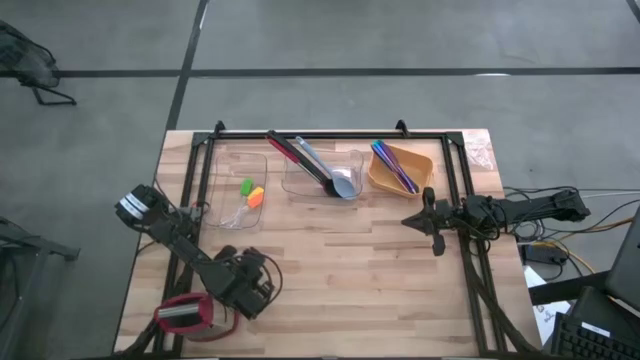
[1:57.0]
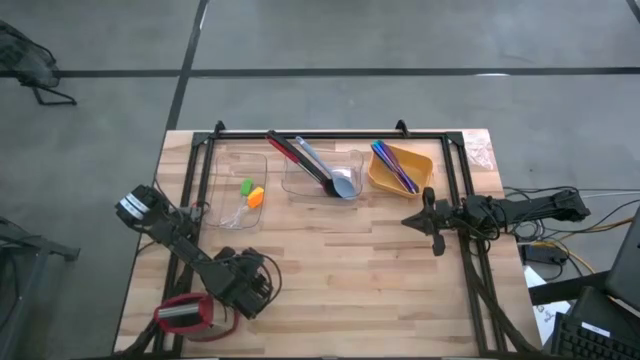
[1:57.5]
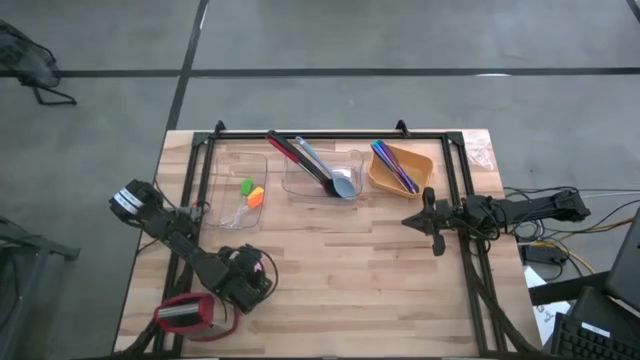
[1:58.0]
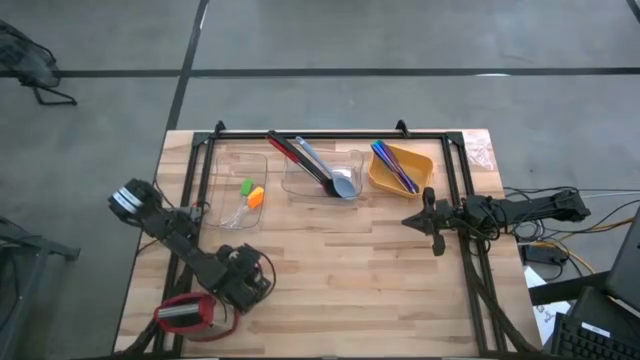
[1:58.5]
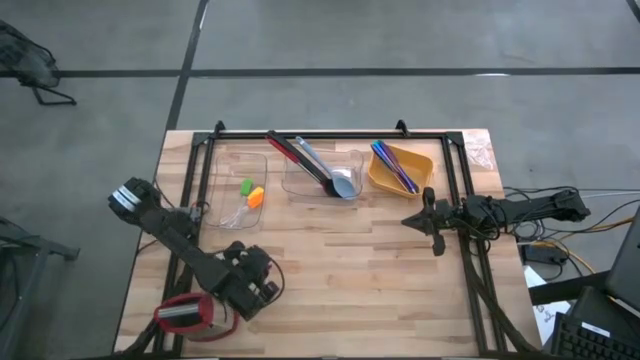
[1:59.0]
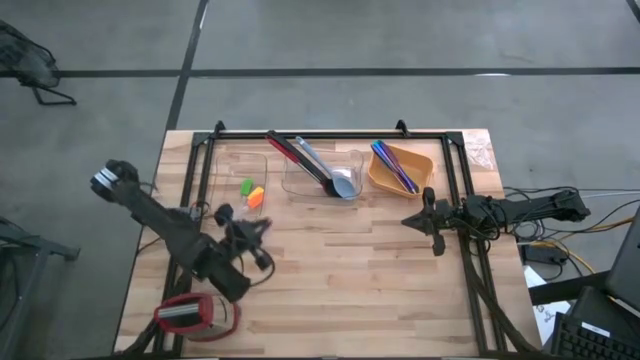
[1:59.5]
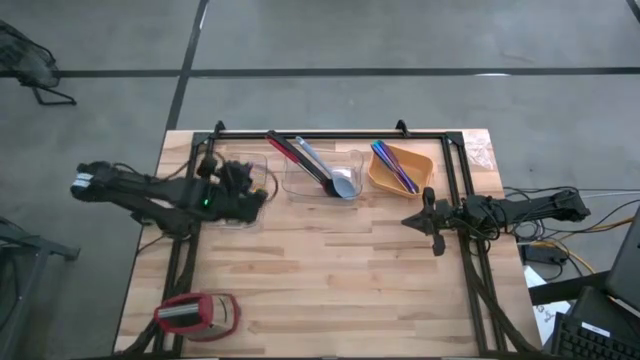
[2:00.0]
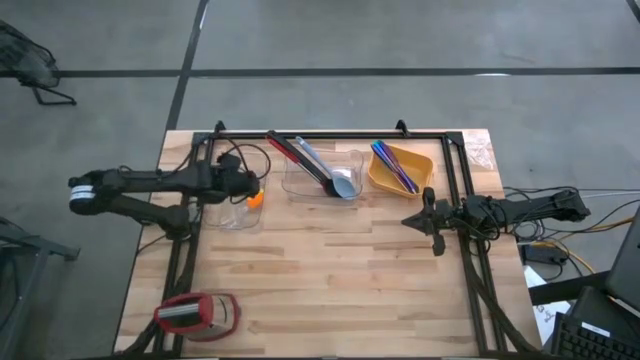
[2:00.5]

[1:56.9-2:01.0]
Task: Sort silverware by color (type)
Put the pink spatula into the left transparent bin

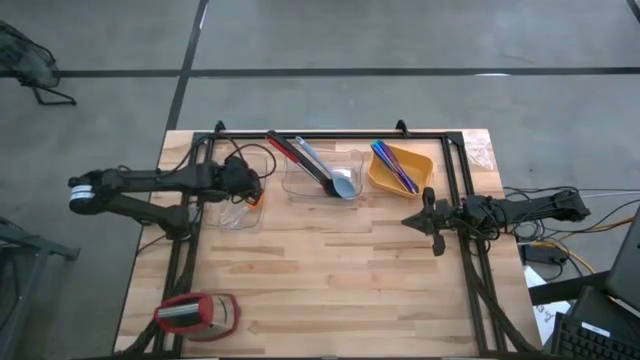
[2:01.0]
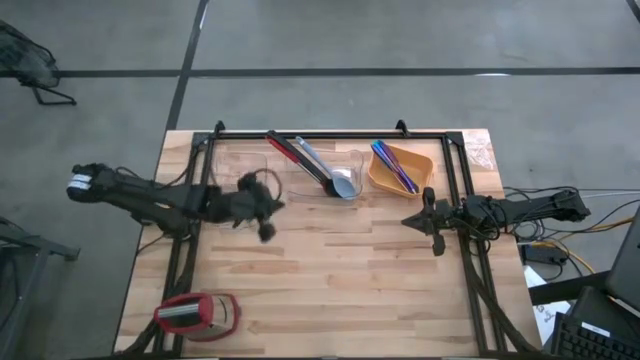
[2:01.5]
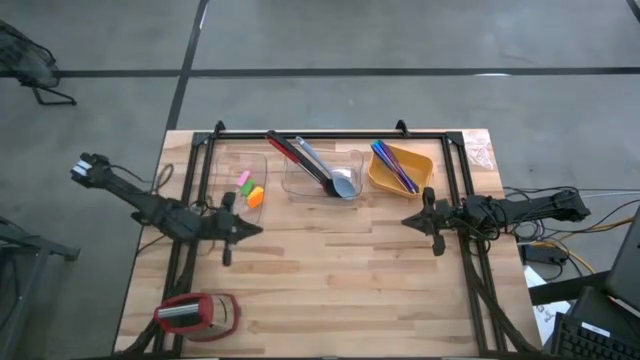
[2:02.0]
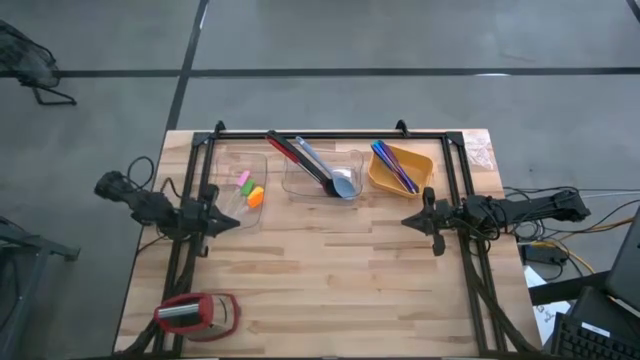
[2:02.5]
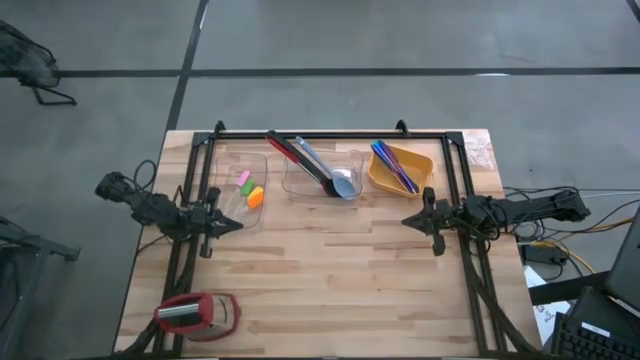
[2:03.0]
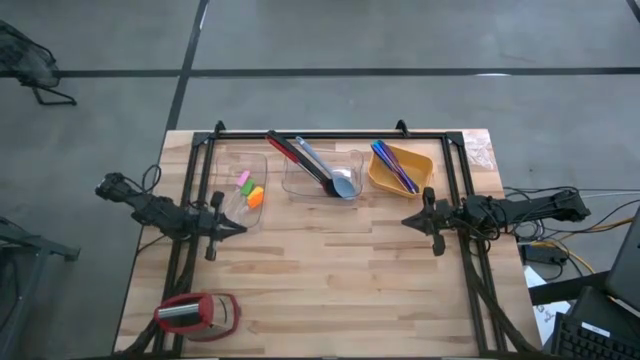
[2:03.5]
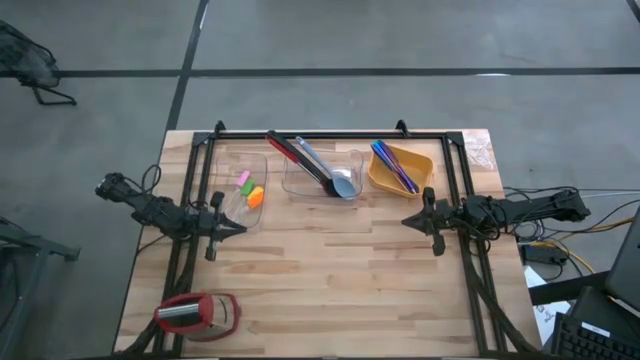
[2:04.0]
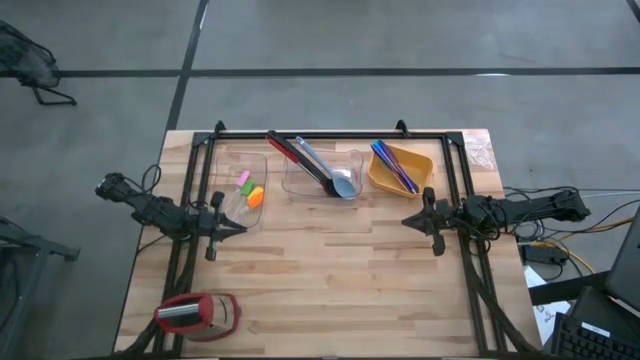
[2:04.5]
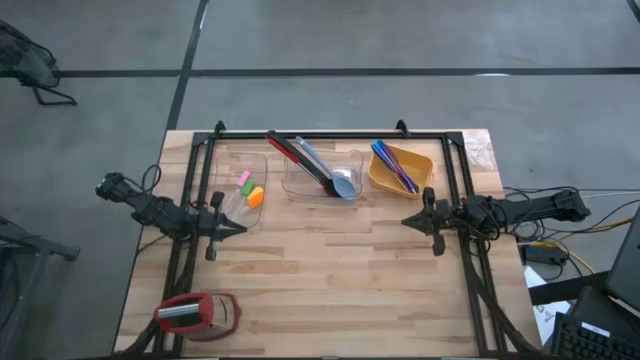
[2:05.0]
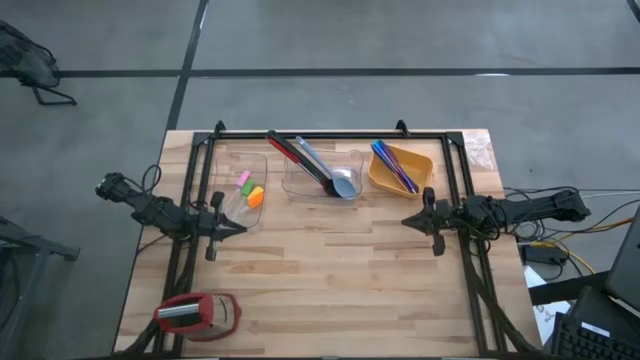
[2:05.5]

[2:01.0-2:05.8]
Return to home position

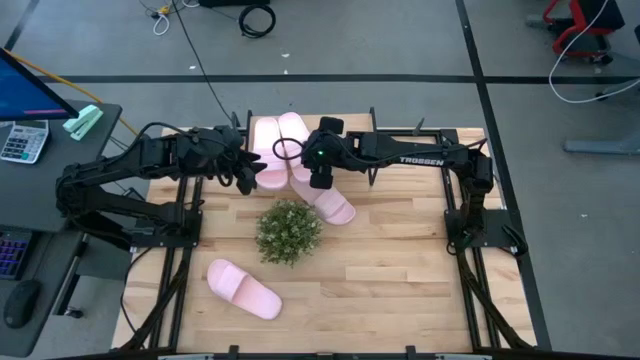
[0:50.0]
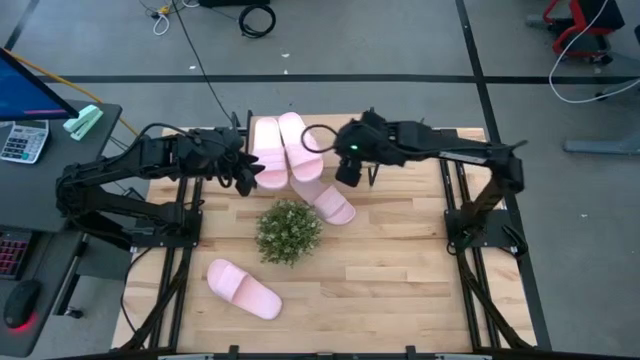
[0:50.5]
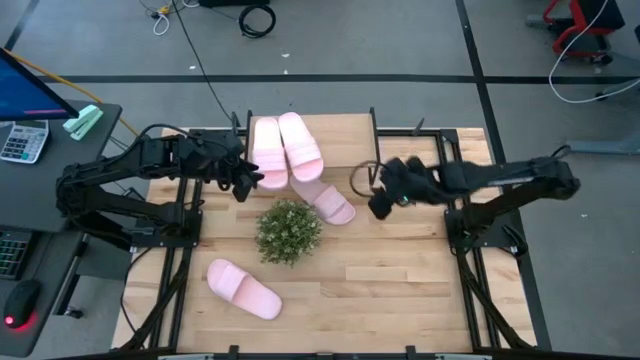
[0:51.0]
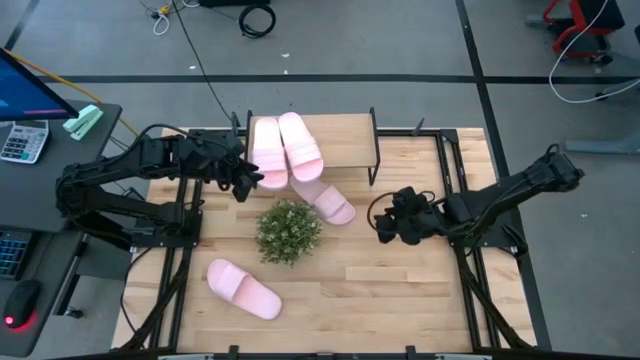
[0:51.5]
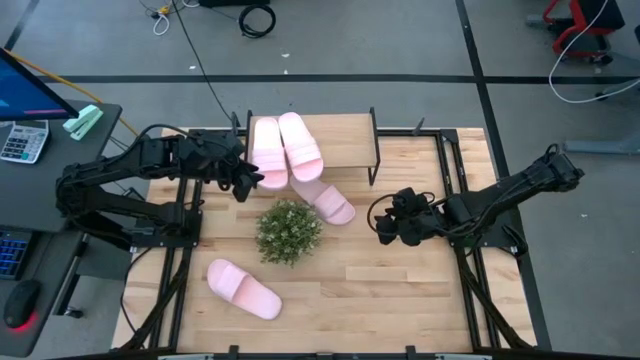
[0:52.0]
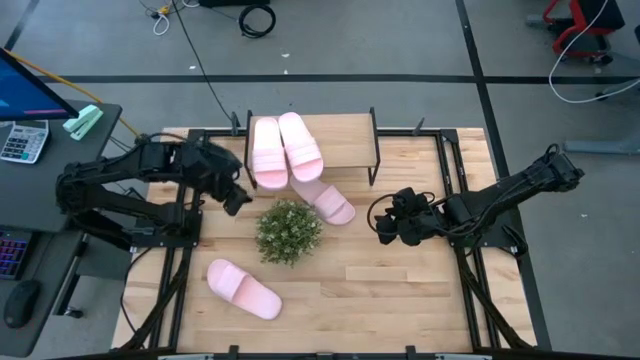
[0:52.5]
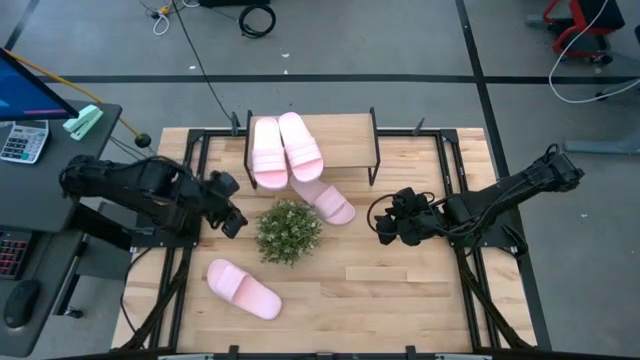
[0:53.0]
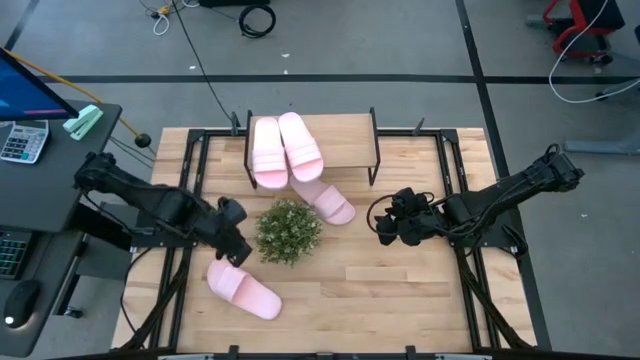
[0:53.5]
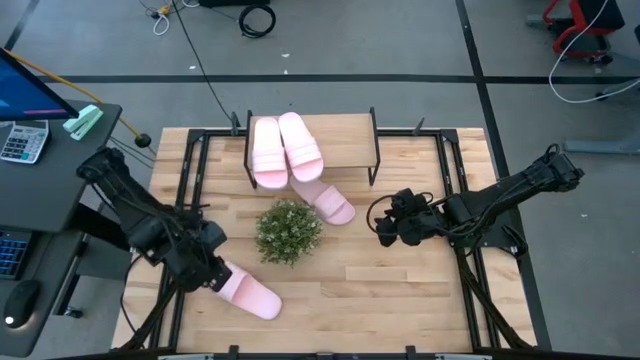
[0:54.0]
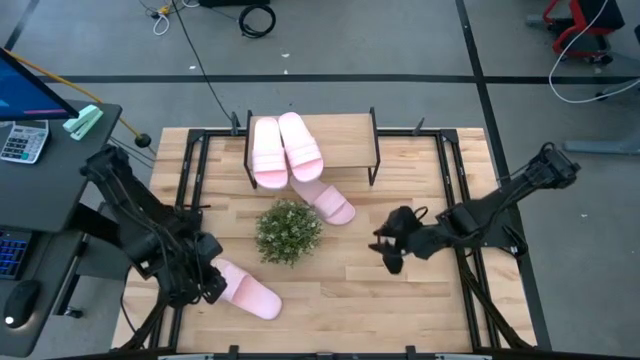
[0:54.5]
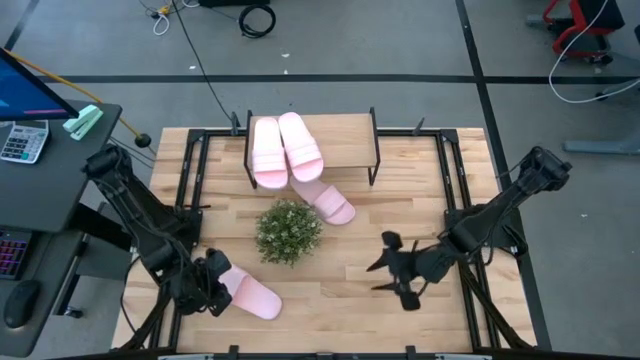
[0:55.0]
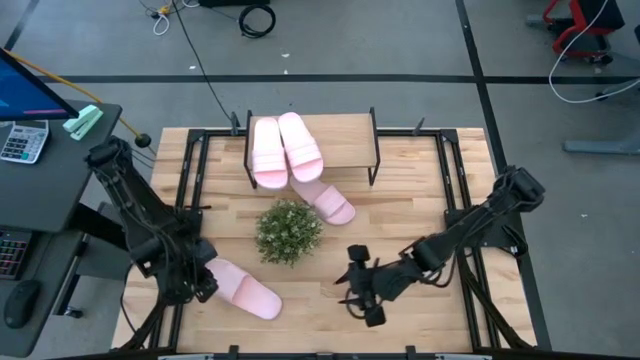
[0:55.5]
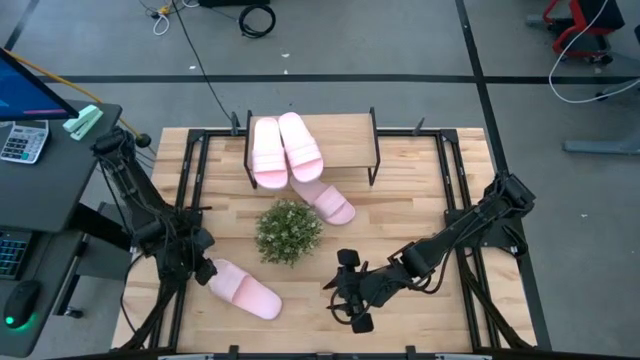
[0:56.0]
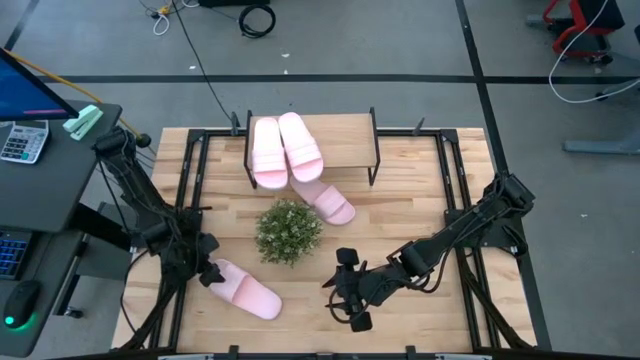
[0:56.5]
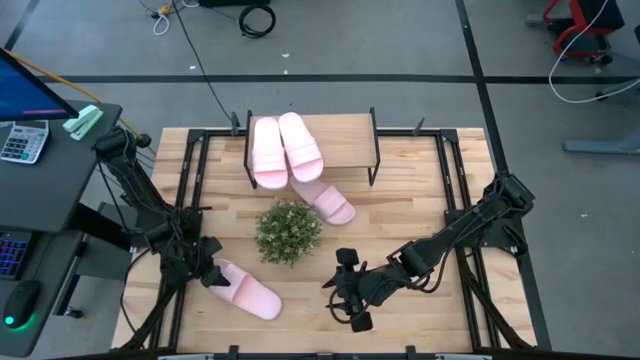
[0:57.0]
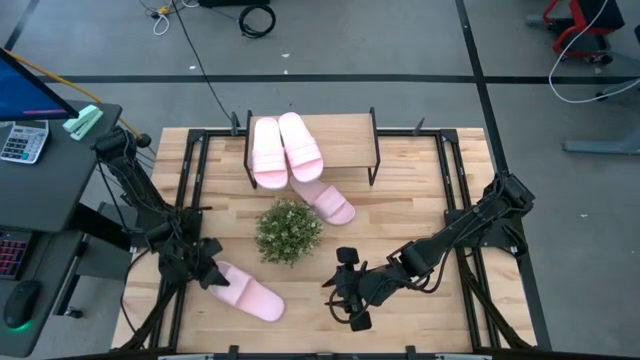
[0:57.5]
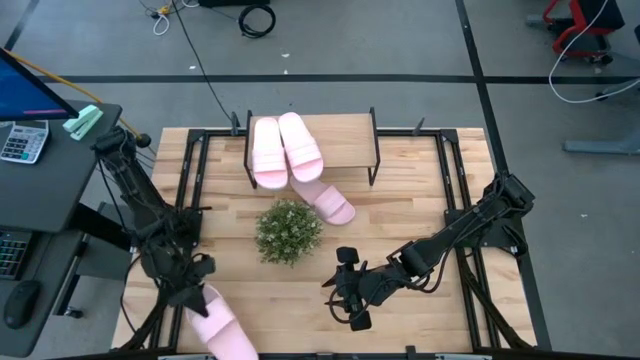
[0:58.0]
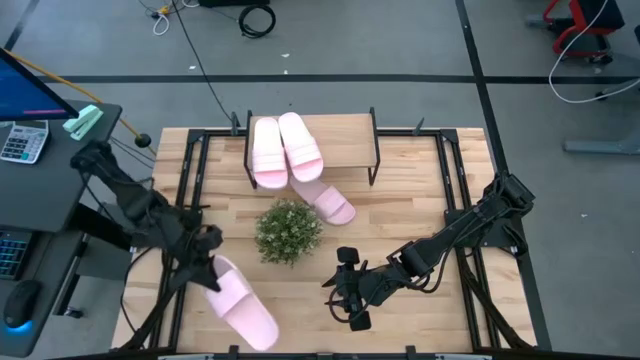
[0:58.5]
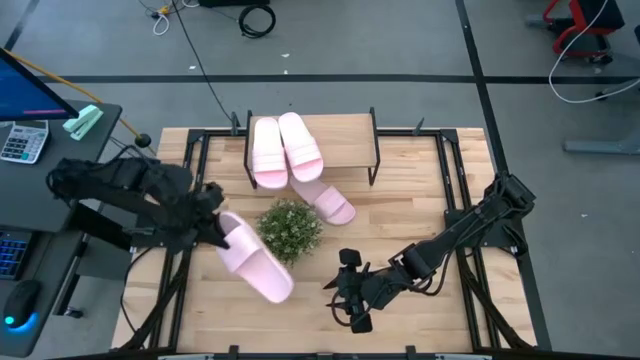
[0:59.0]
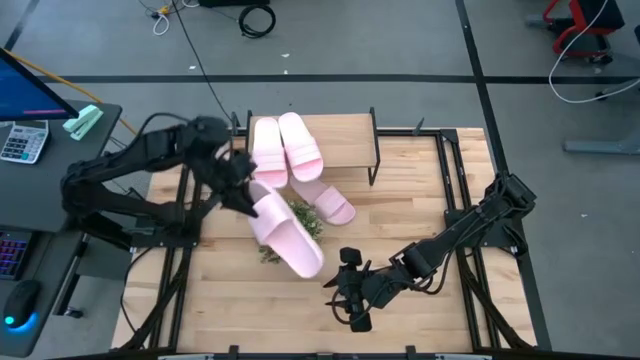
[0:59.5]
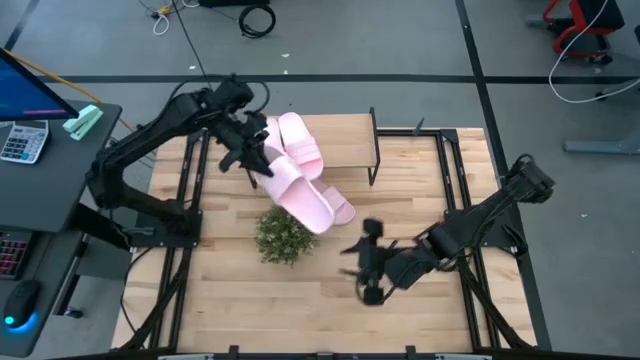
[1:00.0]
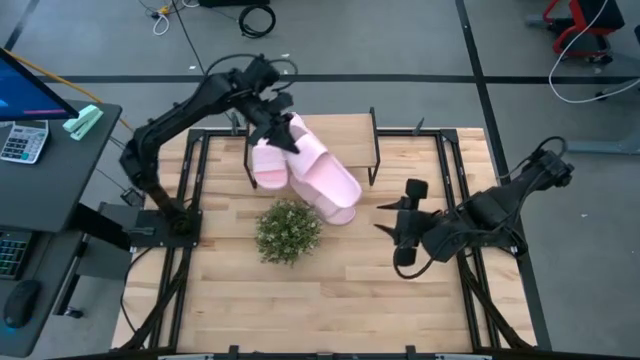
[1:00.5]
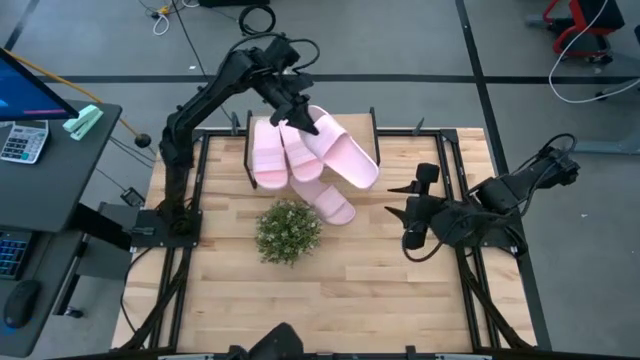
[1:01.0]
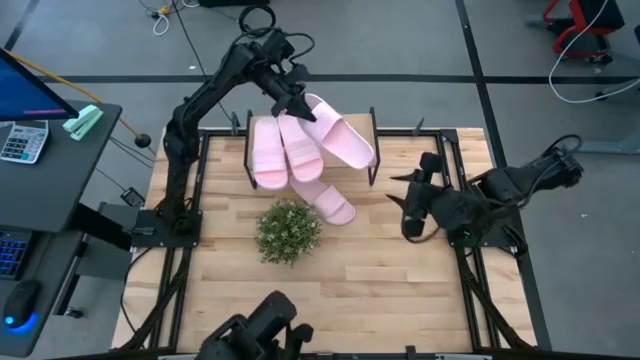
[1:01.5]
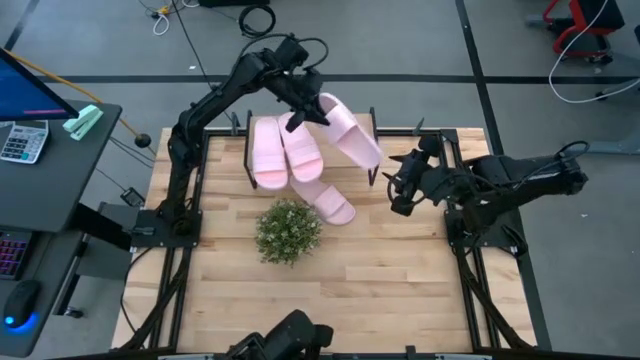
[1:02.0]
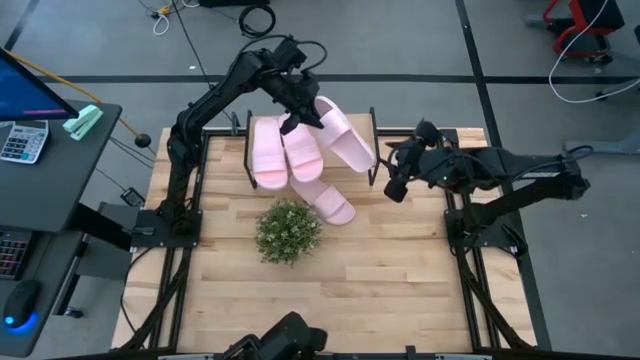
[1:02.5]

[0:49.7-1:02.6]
Task: Pick and place slides into the shelf
Put the pink slide on the shelf
